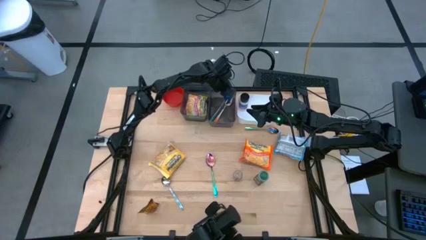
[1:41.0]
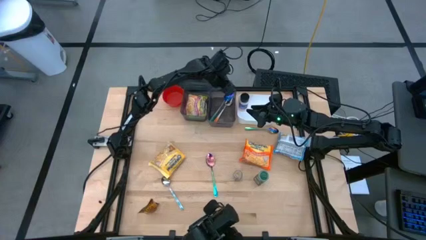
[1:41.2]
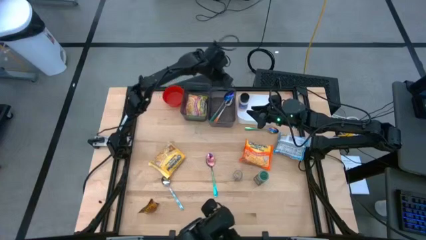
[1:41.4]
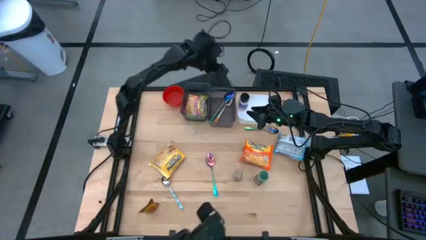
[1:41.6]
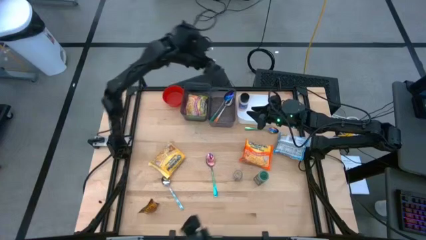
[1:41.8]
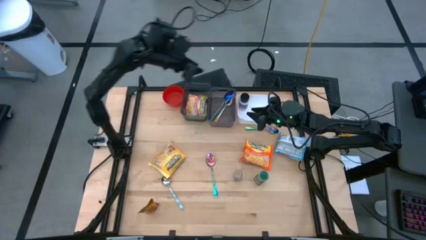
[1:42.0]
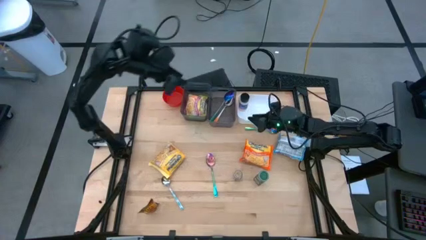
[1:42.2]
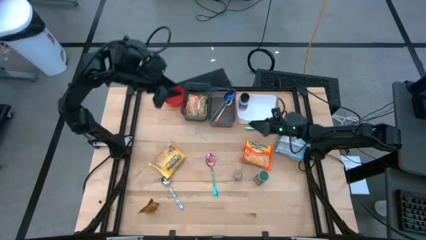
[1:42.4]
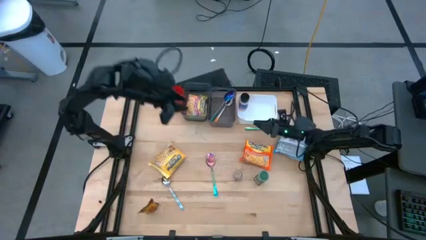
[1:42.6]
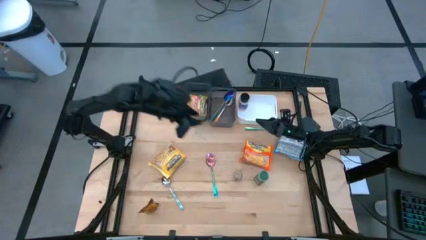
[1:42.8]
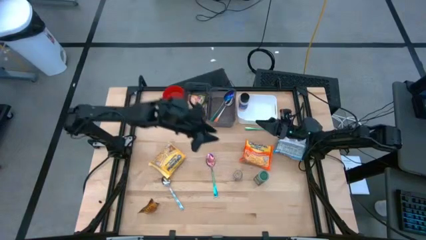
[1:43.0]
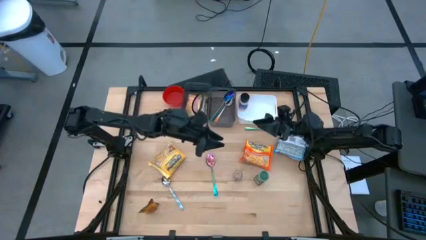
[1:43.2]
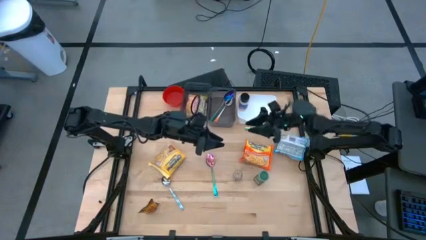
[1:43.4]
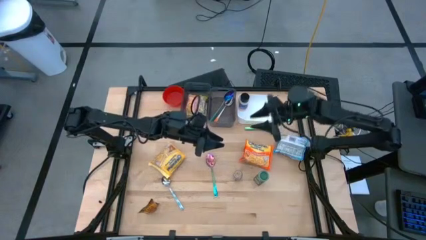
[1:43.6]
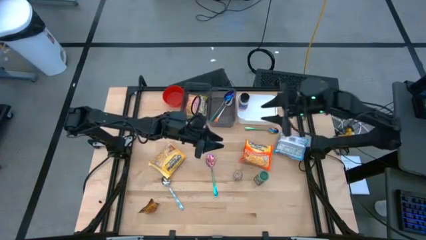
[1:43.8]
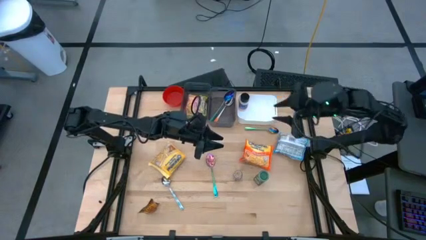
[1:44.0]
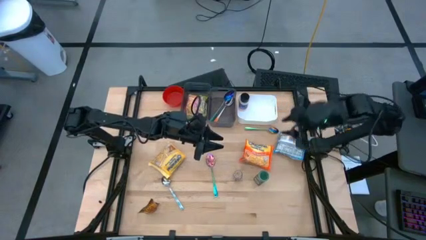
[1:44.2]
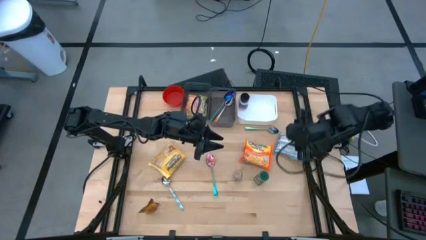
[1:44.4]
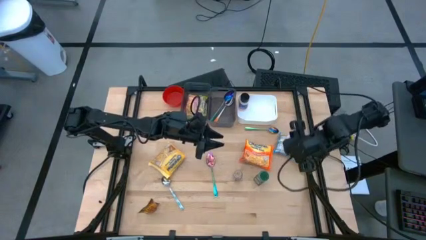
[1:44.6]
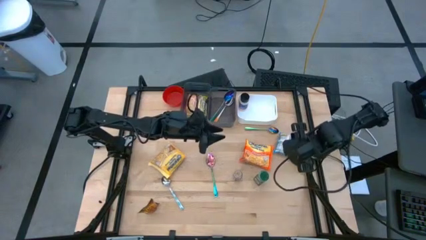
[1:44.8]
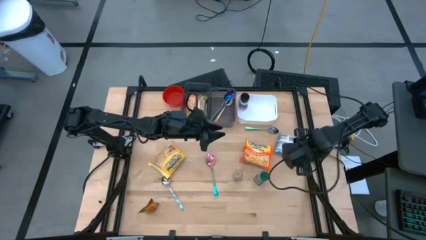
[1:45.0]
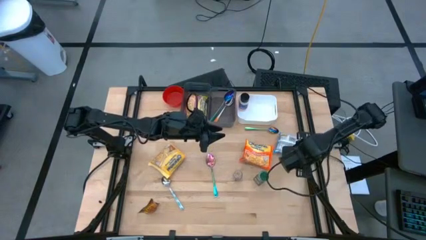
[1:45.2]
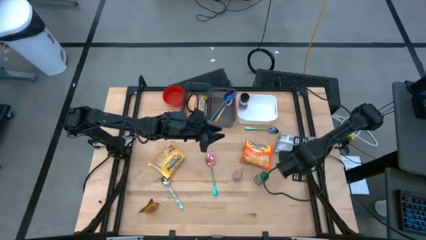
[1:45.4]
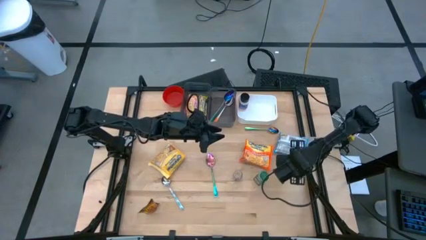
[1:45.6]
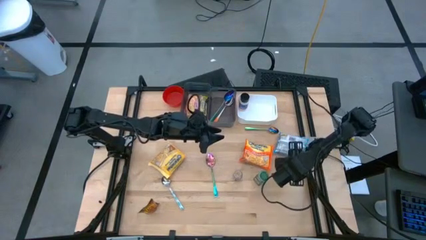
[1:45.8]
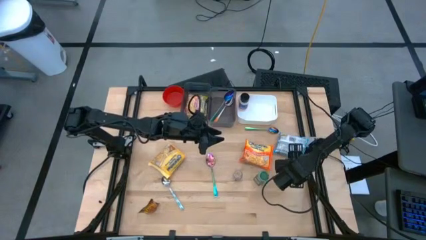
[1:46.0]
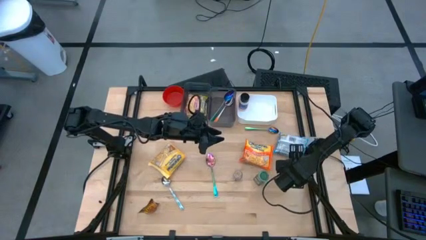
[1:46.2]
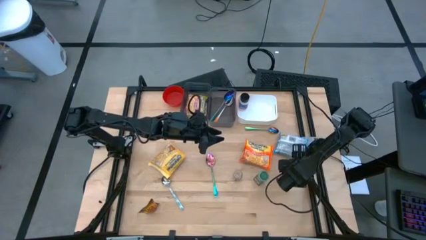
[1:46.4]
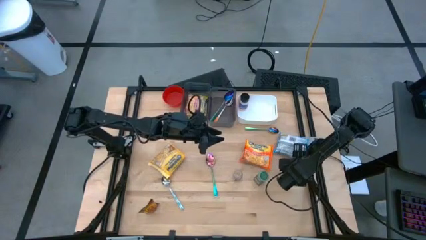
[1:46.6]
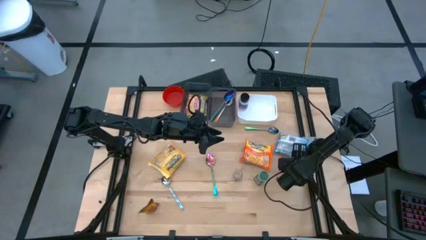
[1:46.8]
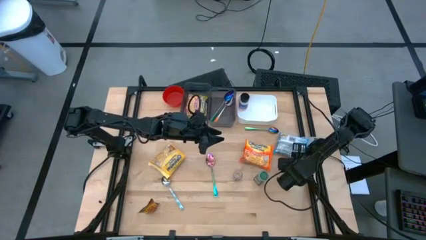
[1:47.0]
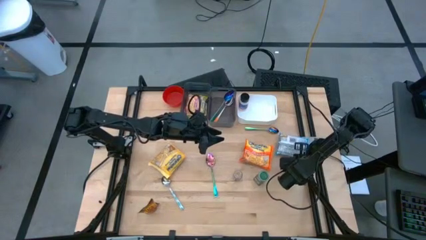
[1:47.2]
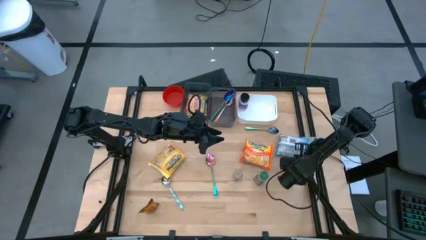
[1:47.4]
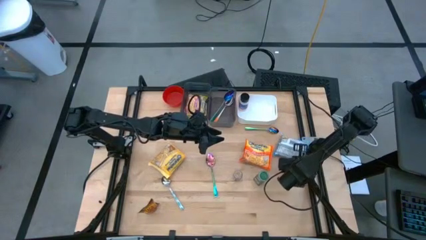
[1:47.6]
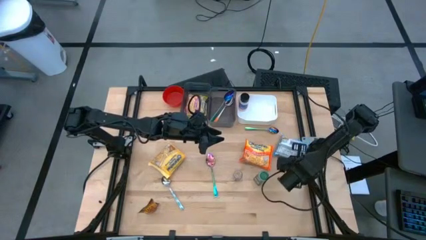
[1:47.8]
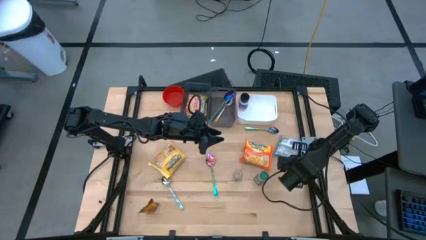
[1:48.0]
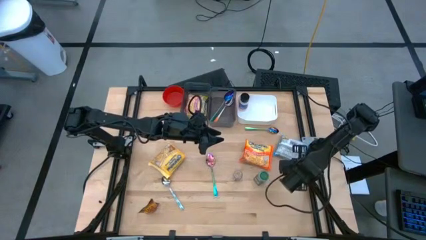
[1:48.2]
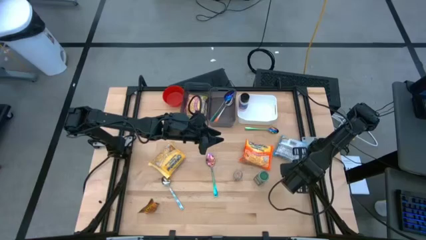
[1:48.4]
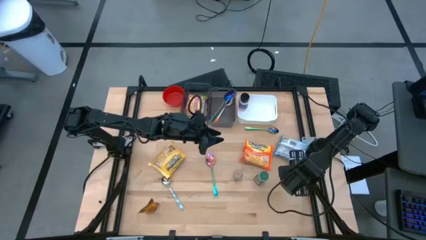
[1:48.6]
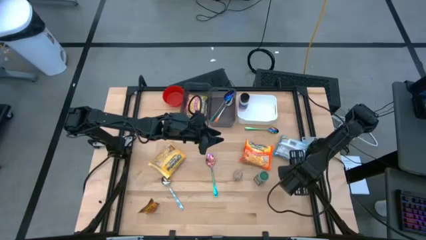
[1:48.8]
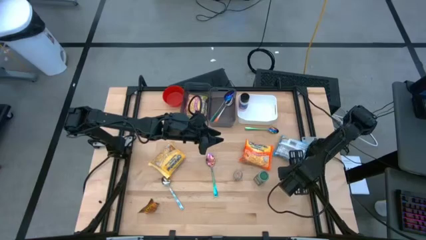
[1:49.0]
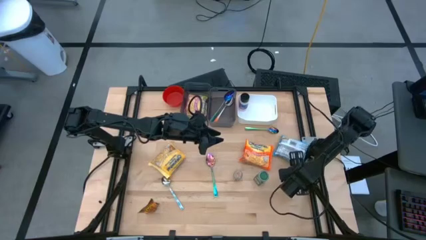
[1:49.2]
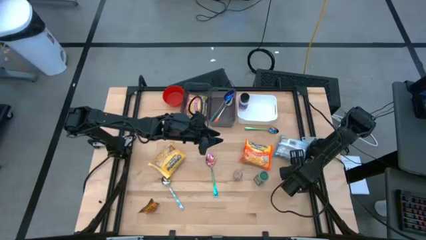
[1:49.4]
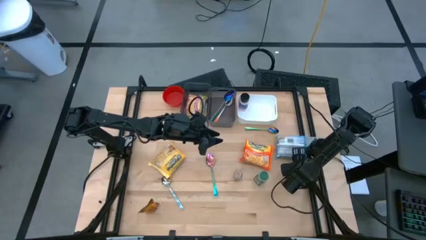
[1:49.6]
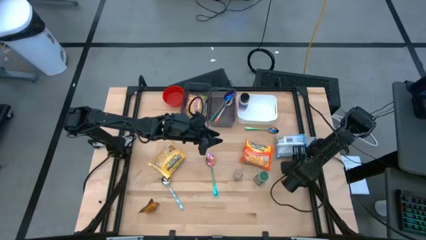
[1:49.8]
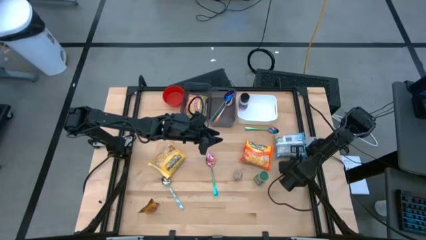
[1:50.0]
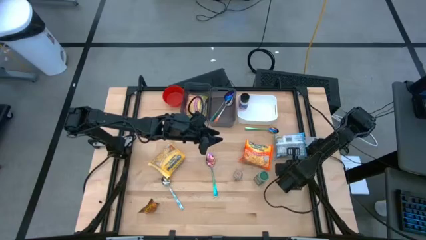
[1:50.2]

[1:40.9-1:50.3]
Task: Pick & Place Food Item
Put the blue noodle pack into the left black bin

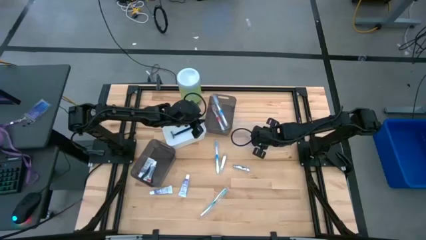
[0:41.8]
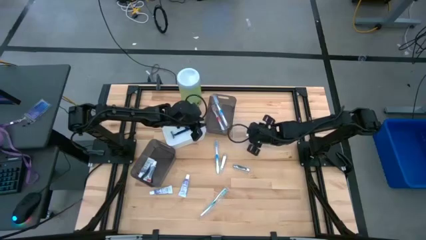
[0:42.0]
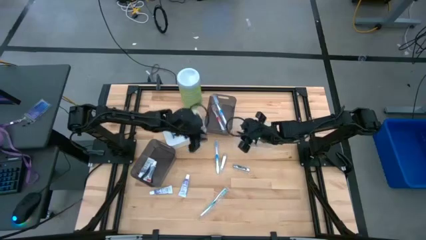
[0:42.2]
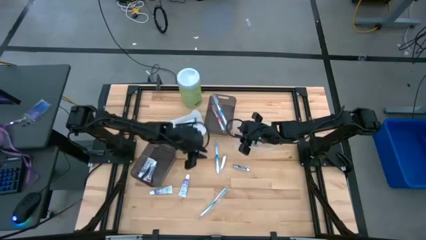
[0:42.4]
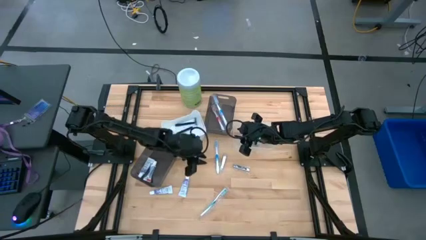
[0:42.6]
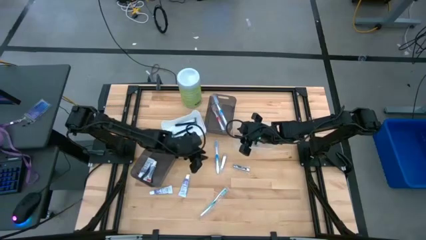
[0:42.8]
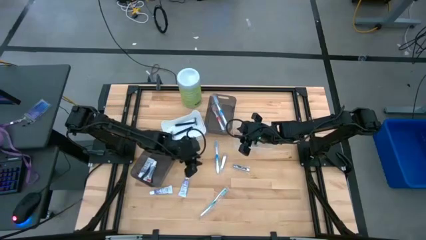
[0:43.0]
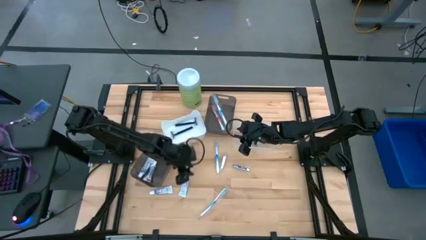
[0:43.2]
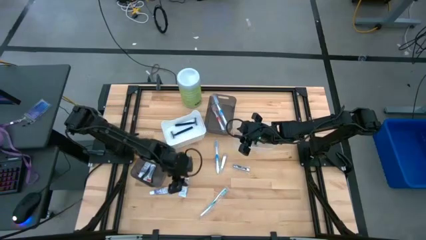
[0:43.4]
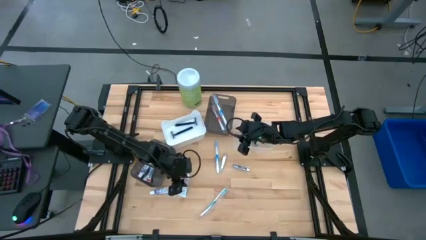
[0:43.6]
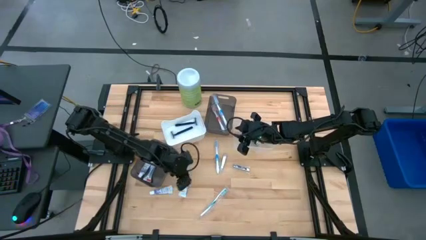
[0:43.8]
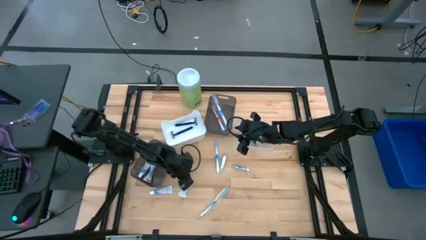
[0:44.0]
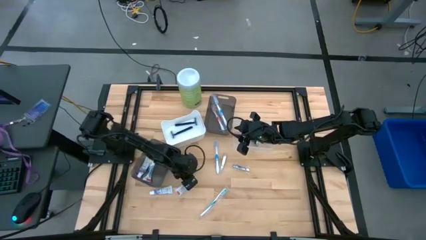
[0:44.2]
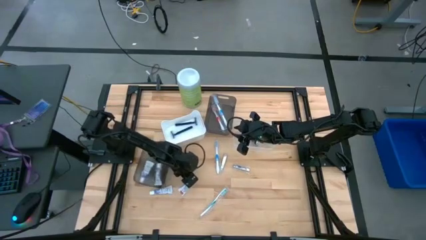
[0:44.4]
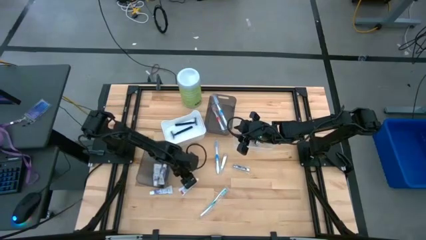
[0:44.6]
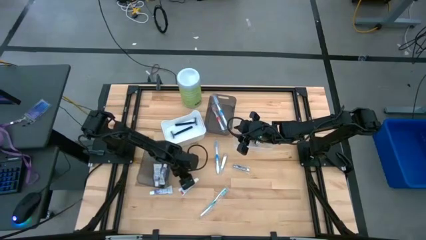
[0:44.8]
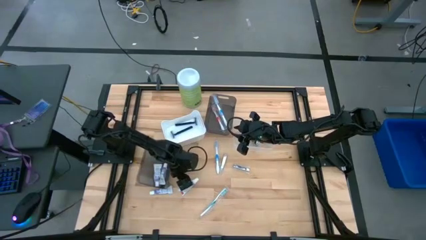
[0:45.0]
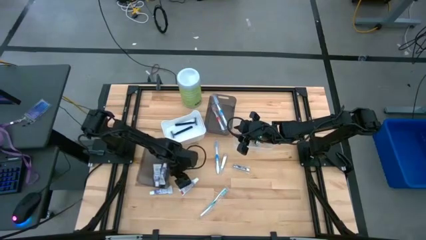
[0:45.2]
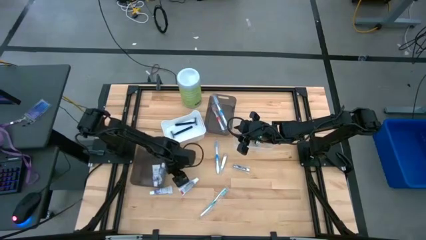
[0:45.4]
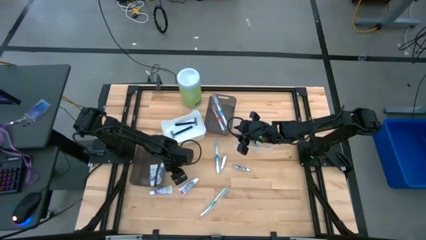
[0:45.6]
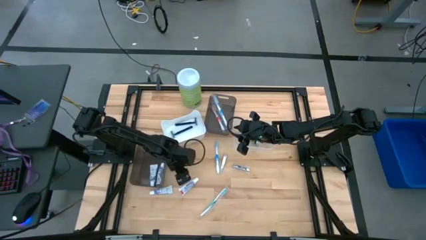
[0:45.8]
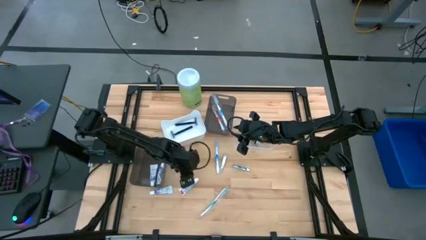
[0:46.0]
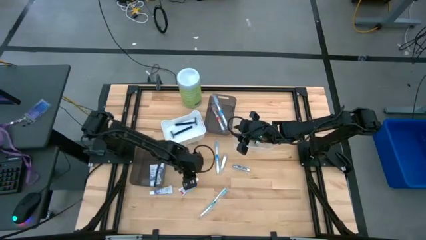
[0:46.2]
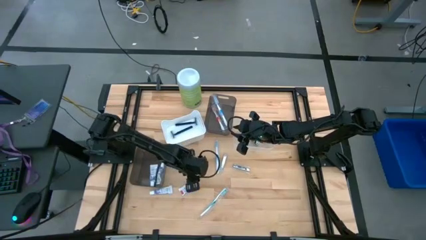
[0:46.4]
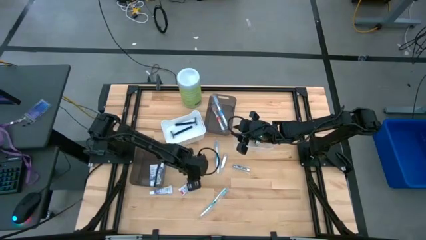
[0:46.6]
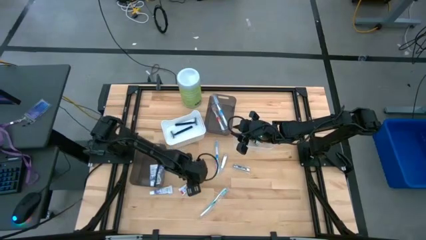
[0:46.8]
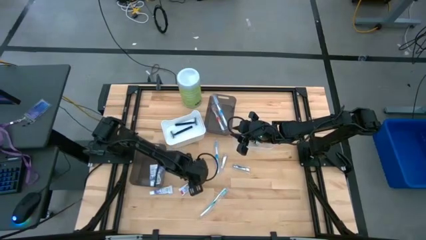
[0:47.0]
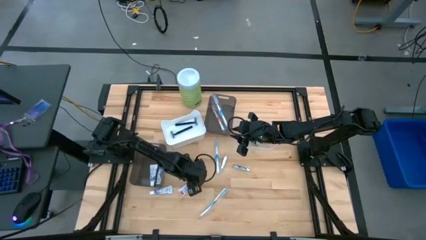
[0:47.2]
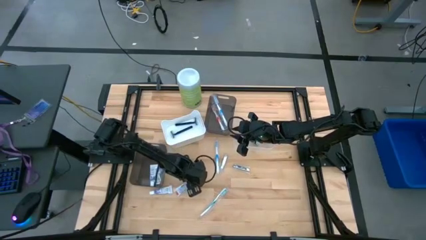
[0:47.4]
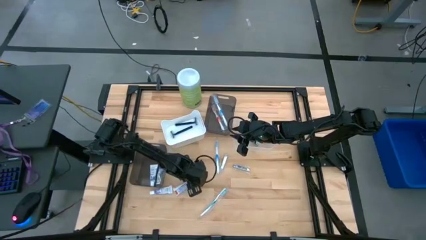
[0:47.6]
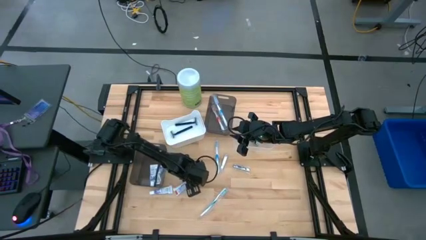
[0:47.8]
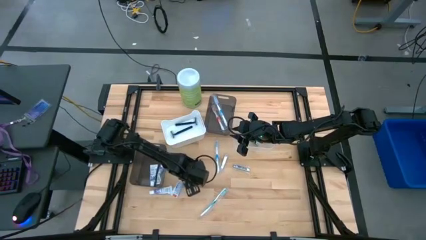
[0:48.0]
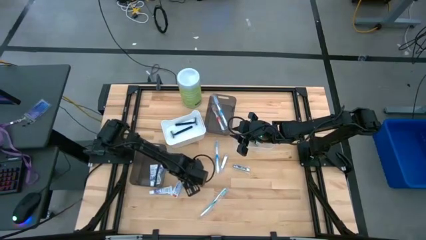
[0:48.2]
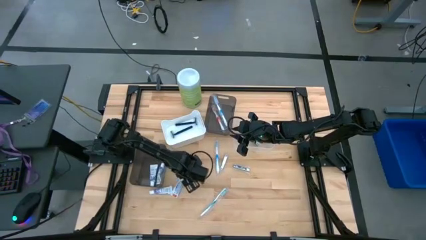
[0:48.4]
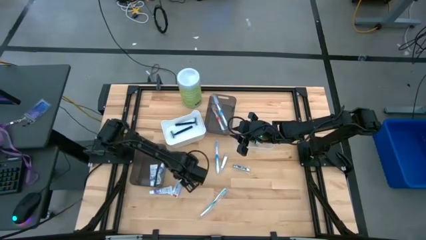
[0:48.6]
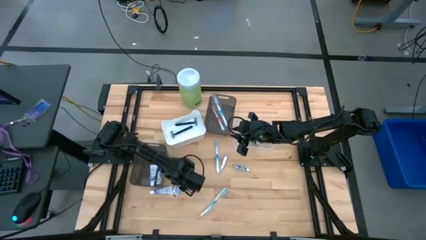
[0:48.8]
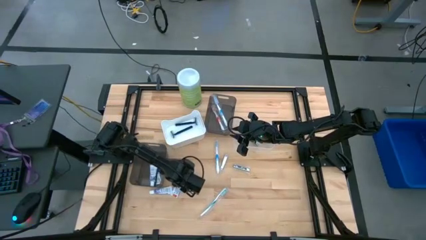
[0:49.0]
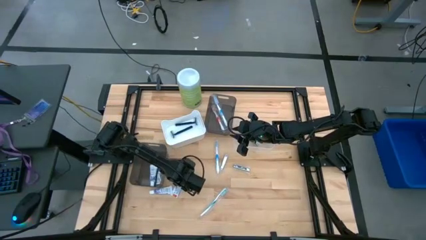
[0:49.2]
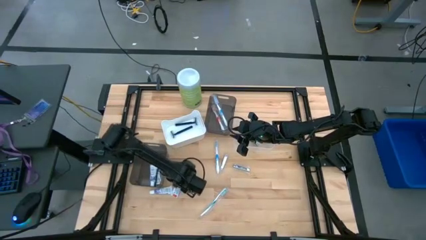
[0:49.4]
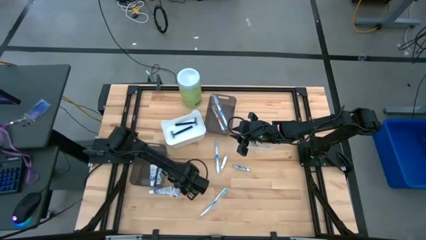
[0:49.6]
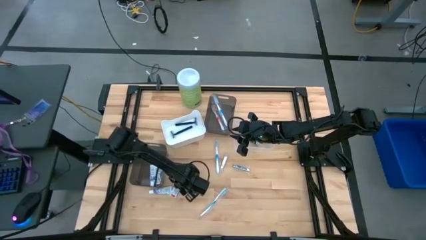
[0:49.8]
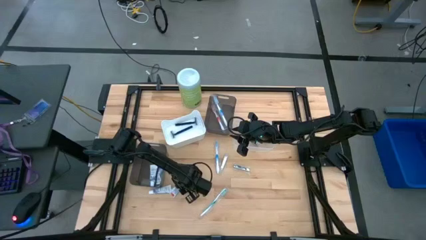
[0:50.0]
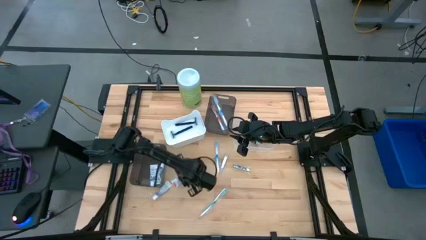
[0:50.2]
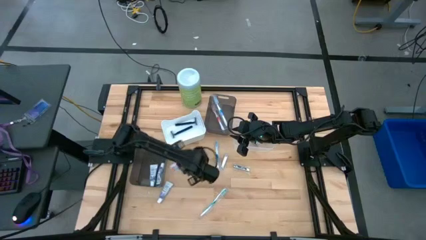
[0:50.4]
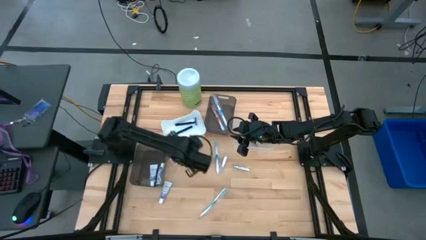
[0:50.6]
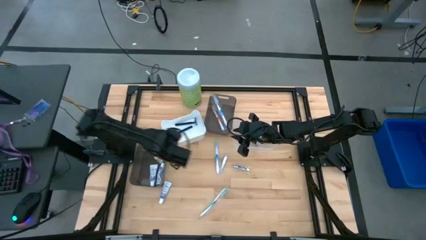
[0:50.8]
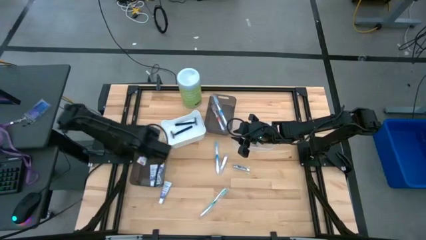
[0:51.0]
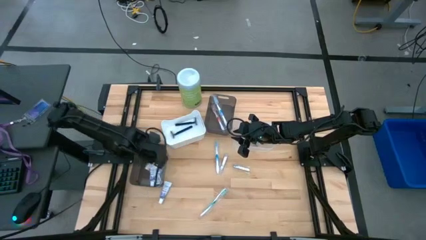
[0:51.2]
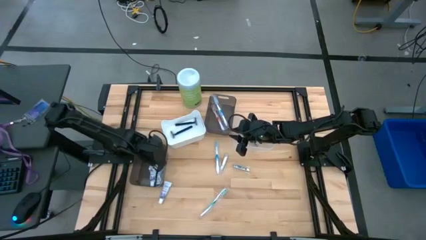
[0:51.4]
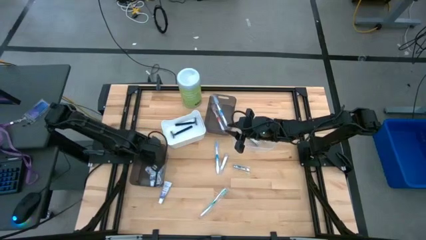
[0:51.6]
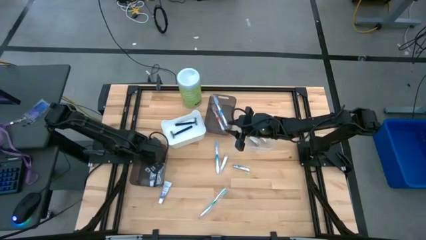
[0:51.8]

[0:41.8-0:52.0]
Task: Pick & Place Travel size toiletries
Put the purple toothpaste into the bottom black bin
